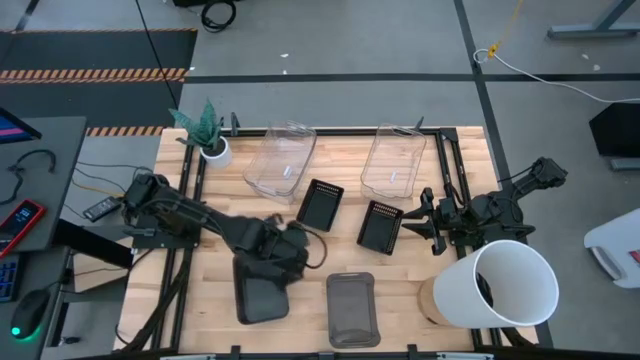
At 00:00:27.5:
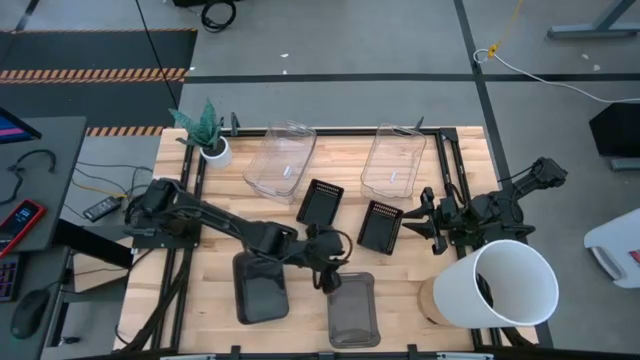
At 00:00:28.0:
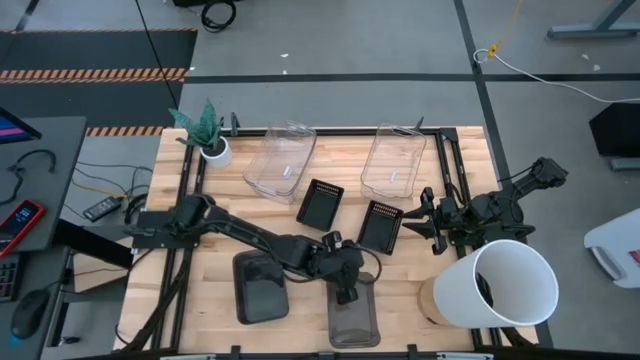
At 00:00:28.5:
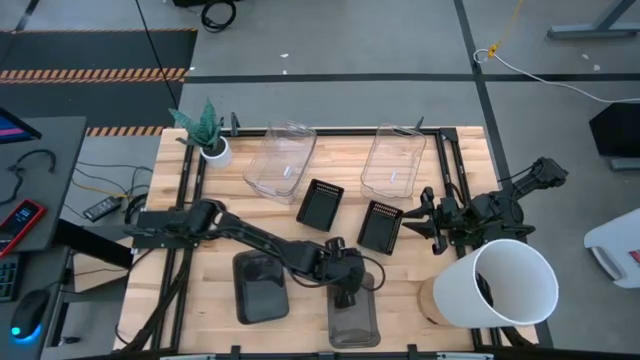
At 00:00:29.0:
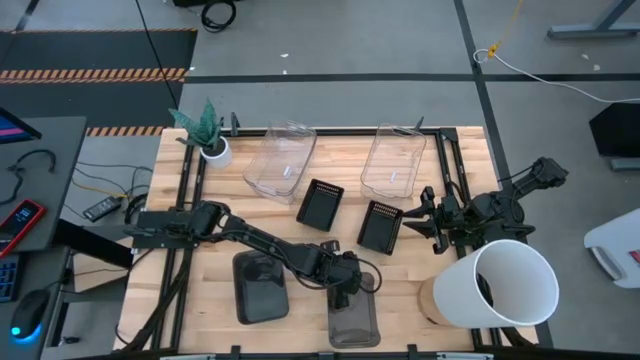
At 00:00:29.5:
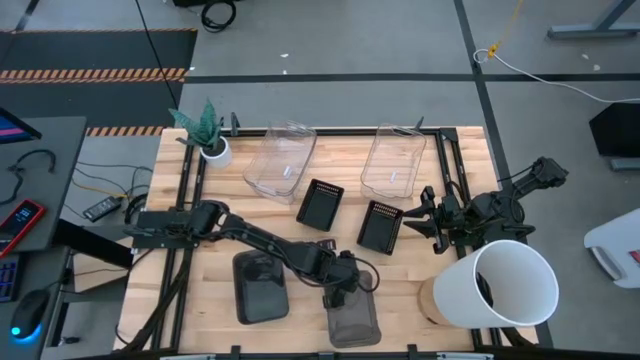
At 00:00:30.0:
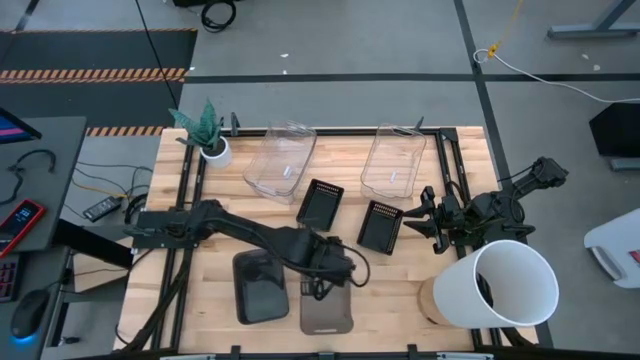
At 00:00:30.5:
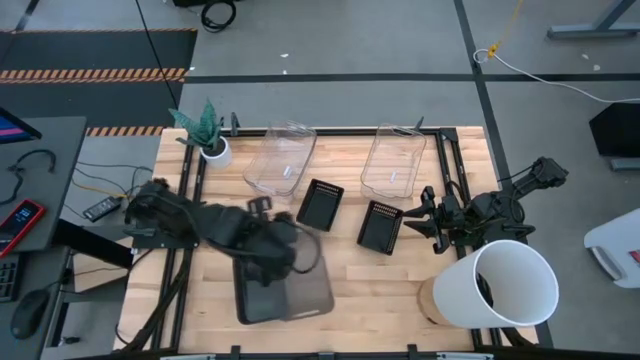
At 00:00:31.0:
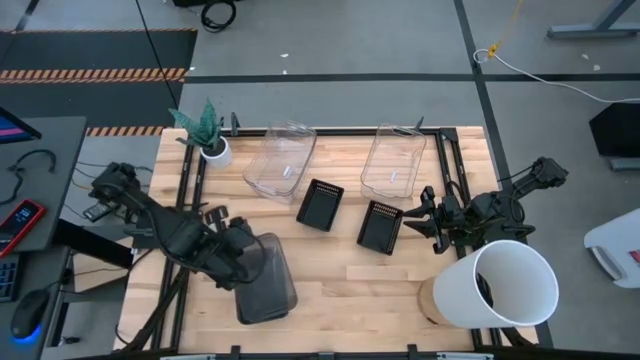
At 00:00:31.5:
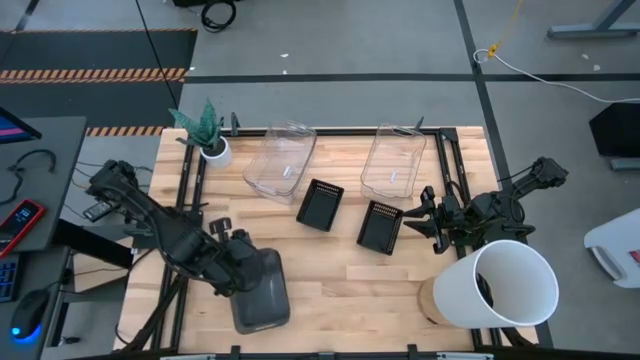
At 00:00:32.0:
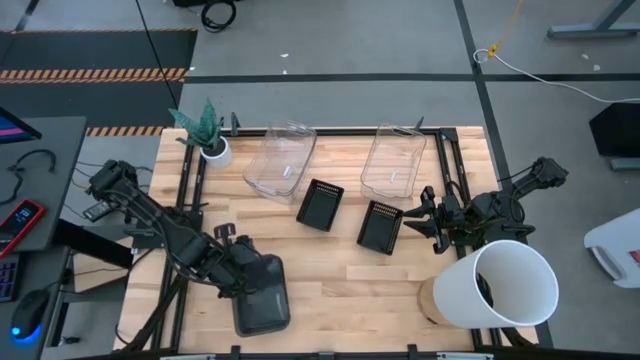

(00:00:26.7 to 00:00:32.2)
Stack the right black transparent bin on top of the left black transparent bins

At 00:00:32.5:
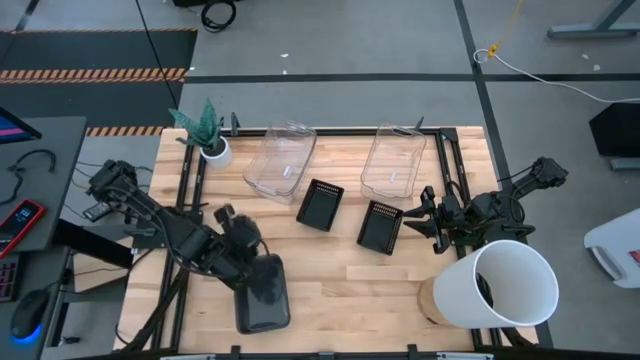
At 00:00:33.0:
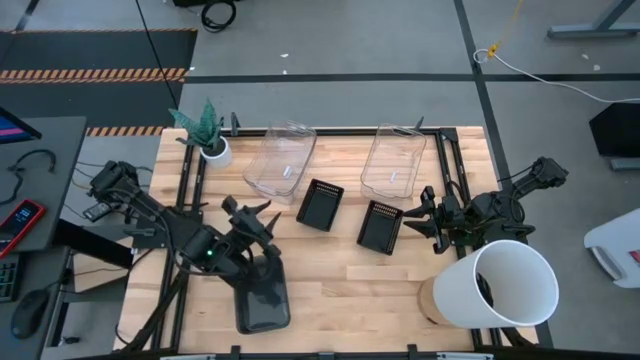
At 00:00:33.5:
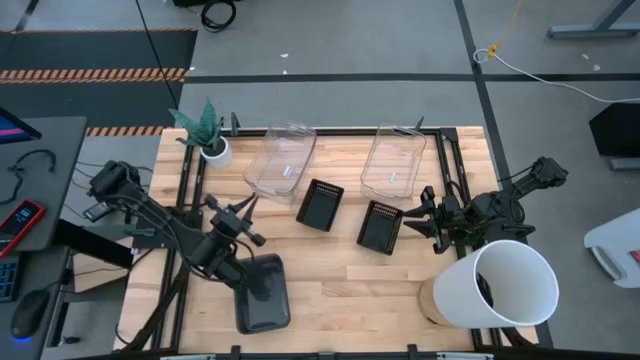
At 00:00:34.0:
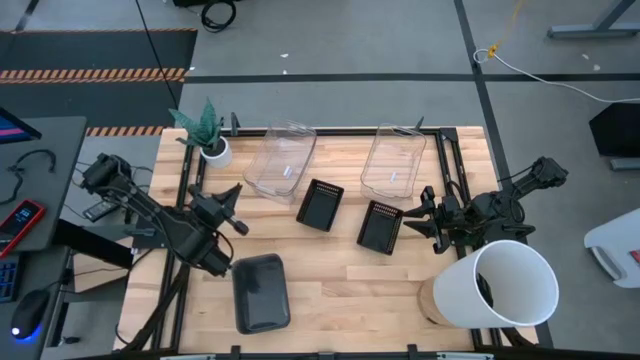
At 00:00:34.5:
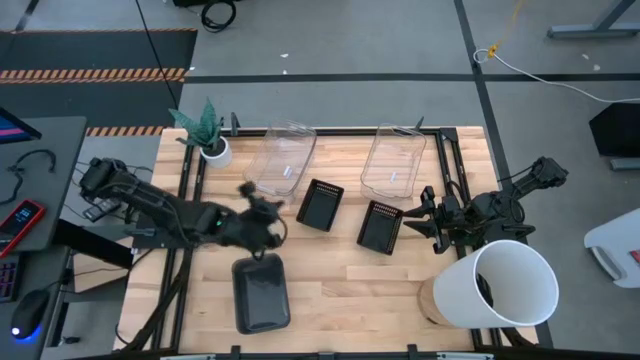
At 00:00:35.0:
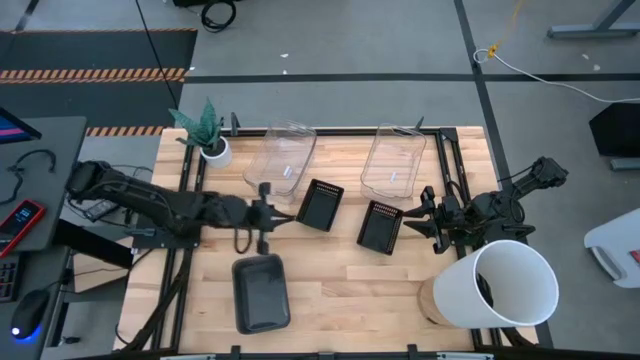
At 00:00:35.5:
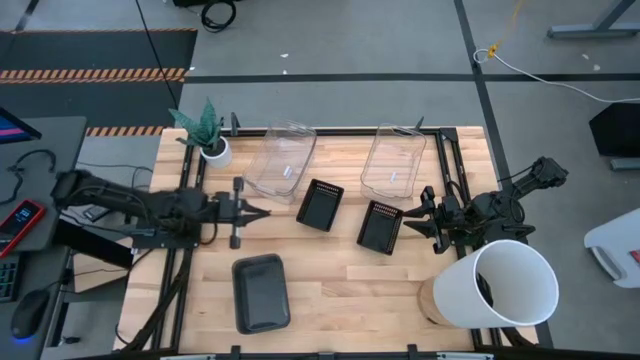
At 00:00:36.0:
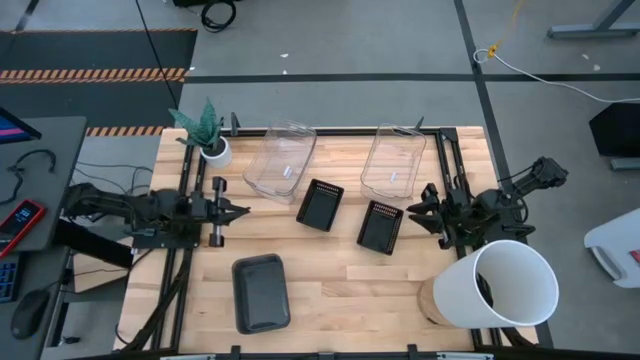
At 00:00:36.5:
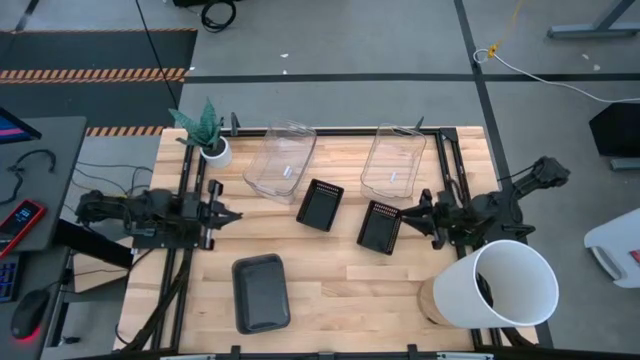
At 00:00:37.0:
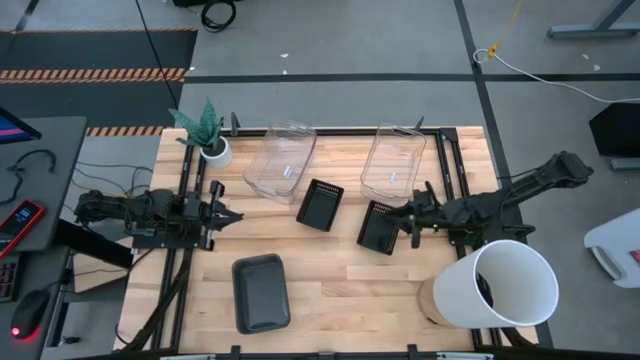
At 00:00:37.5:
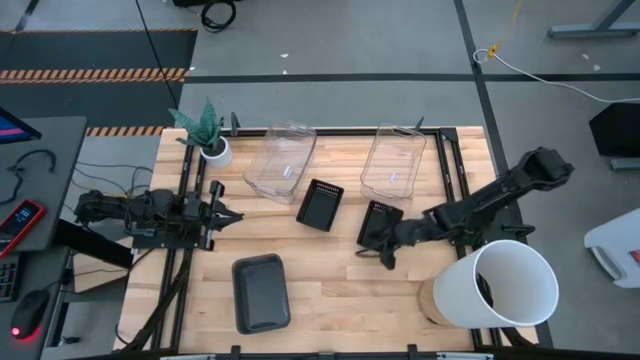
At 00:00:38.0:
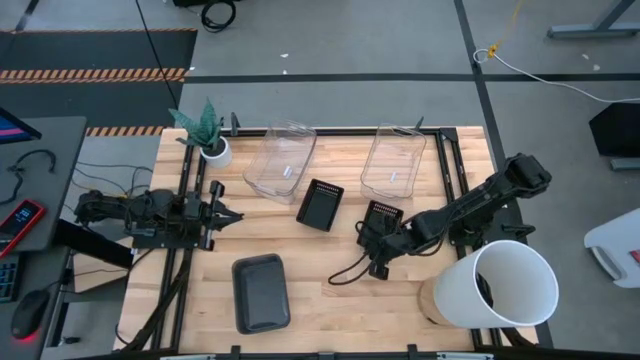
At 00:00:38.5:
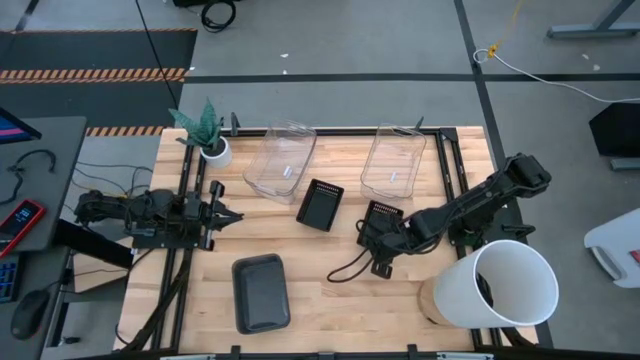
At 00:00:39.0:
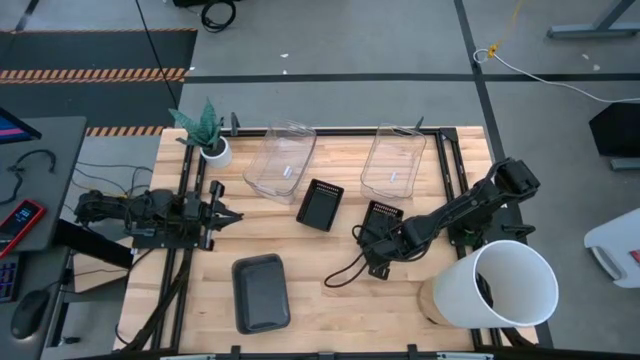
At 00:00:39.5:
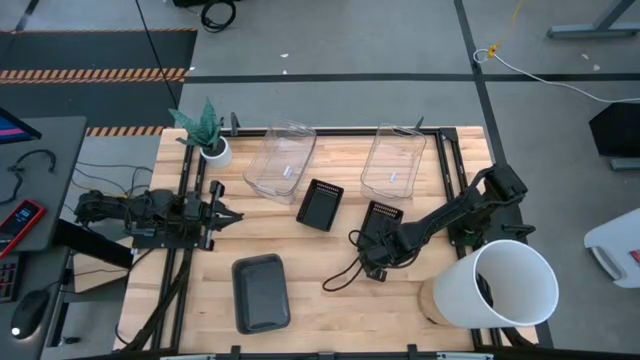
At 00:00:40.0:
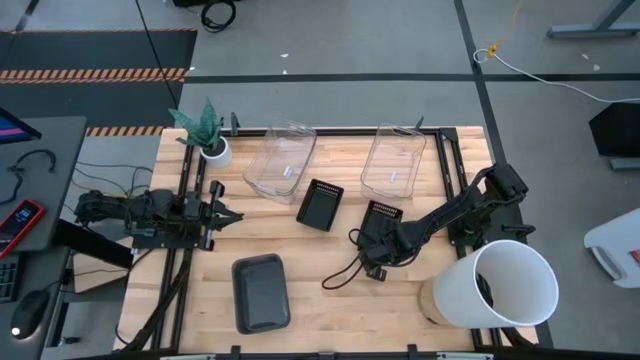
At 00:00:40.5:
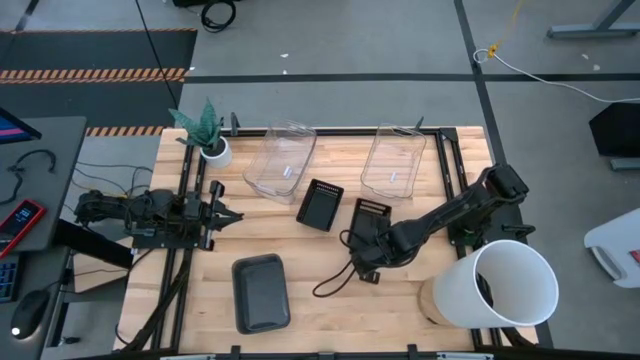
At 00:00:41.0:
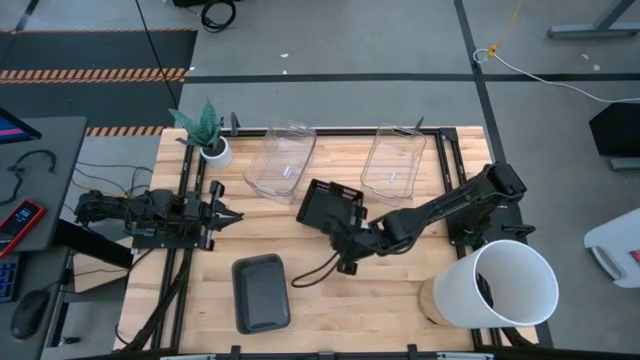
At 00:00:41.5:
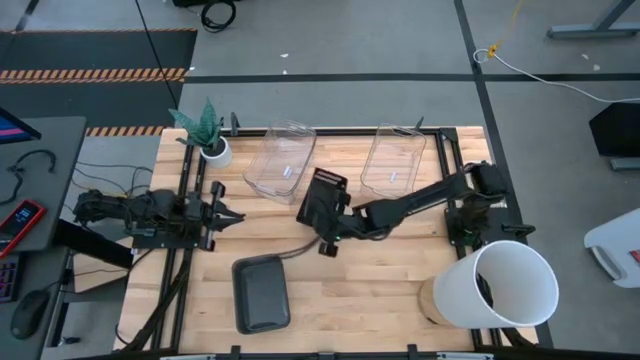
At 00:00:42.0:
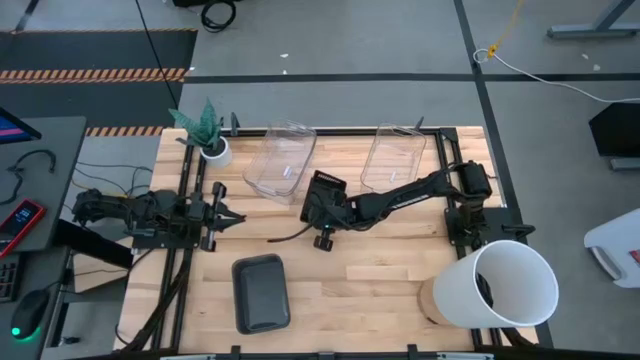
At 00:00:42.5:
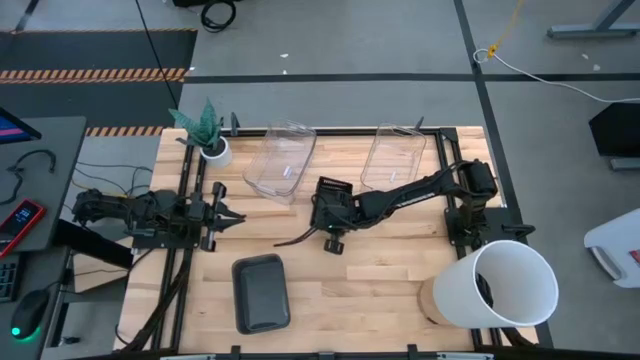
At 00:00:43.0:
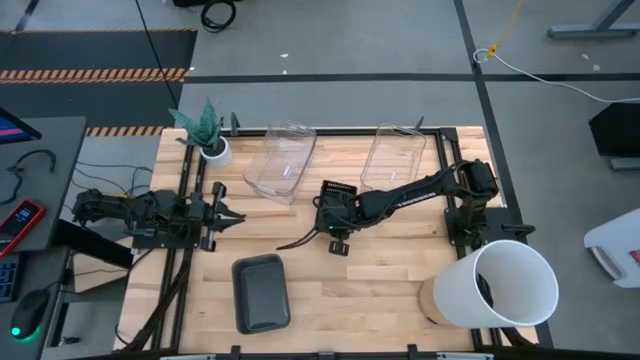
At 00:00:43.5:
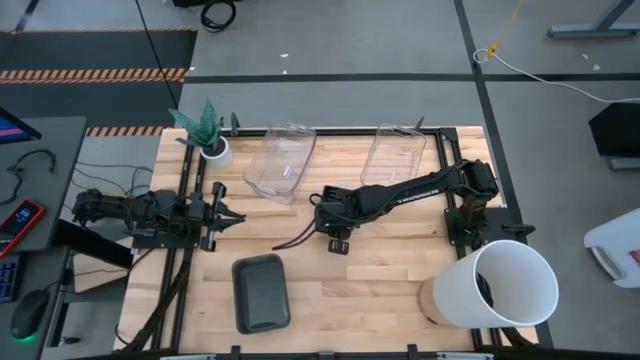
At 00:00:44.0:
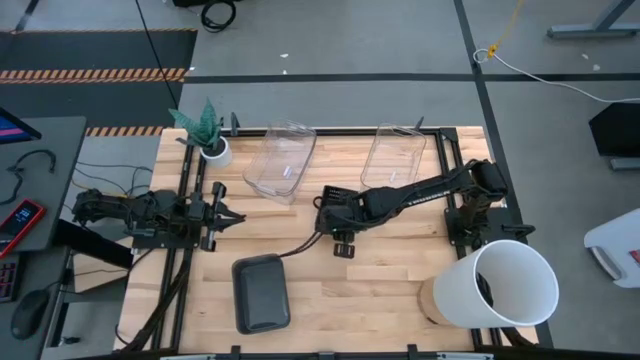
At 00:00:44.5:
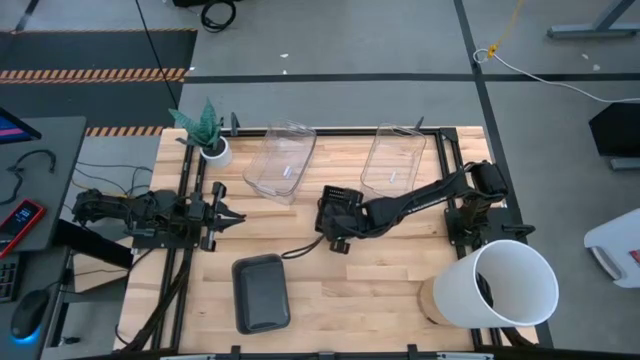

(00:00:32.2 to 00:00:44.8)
Stack the right black bin on top of the left black bins
